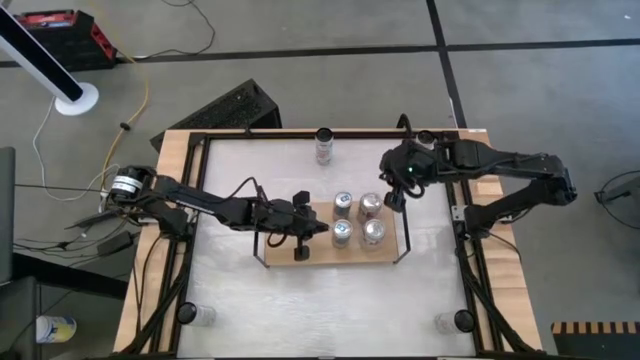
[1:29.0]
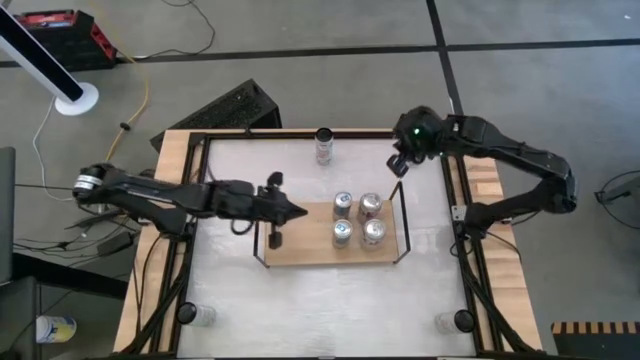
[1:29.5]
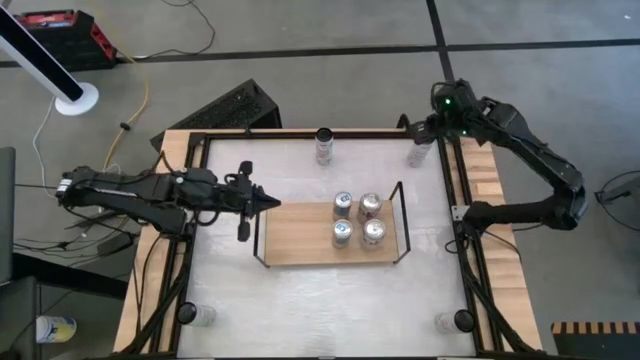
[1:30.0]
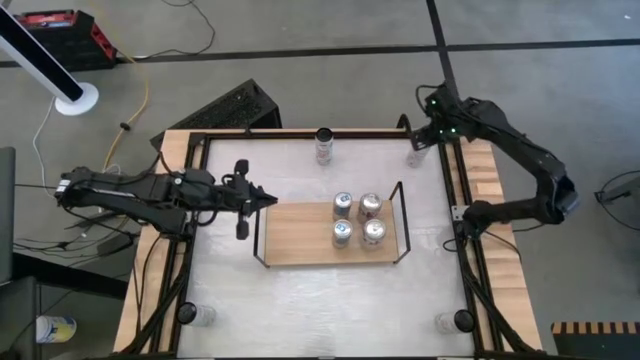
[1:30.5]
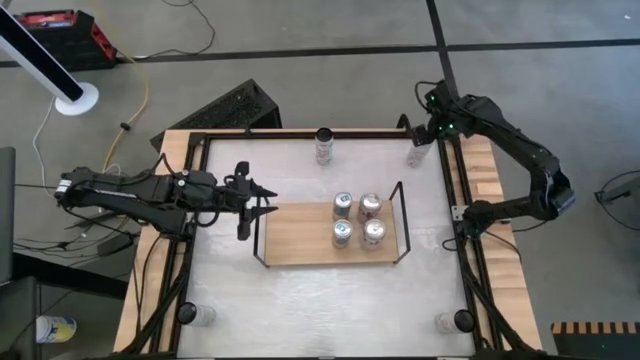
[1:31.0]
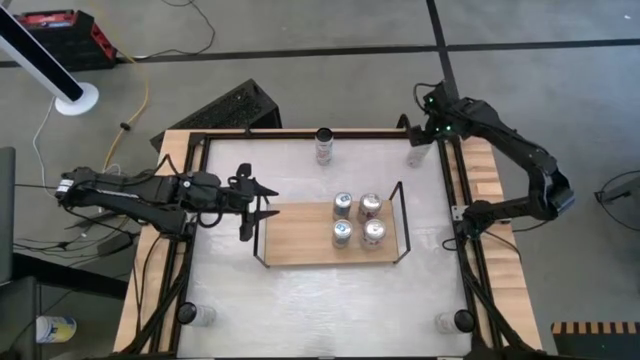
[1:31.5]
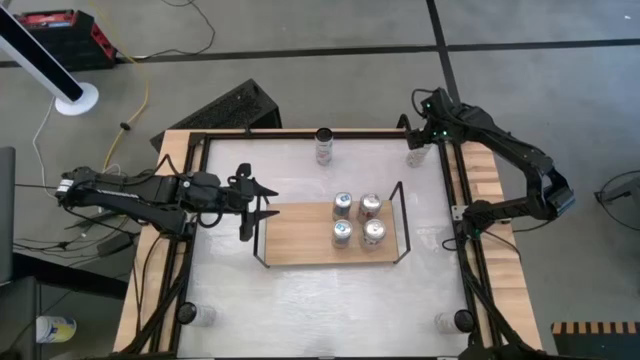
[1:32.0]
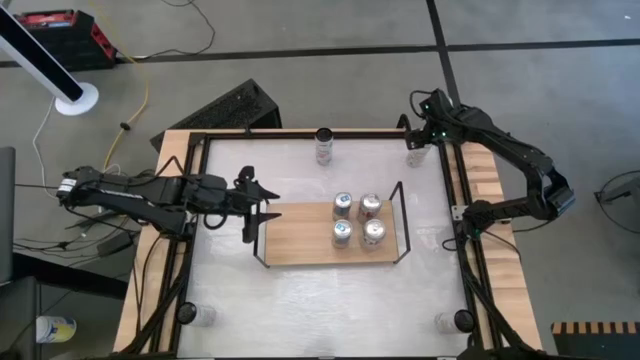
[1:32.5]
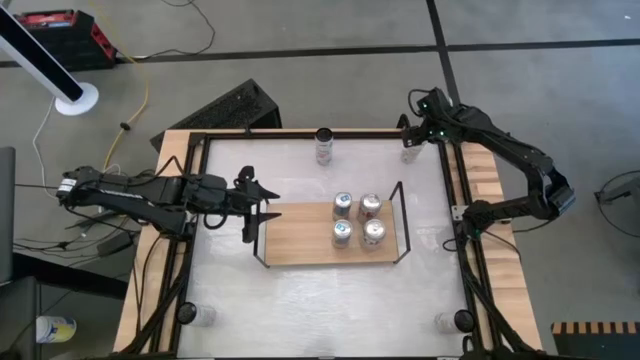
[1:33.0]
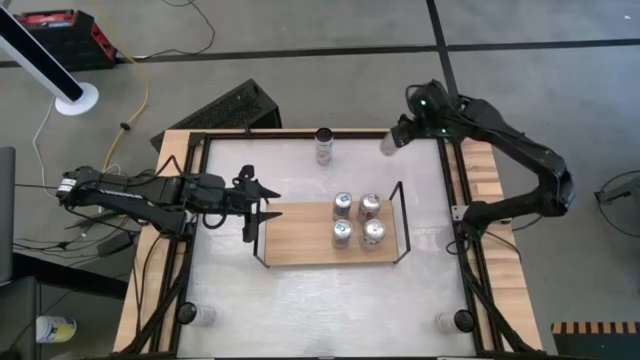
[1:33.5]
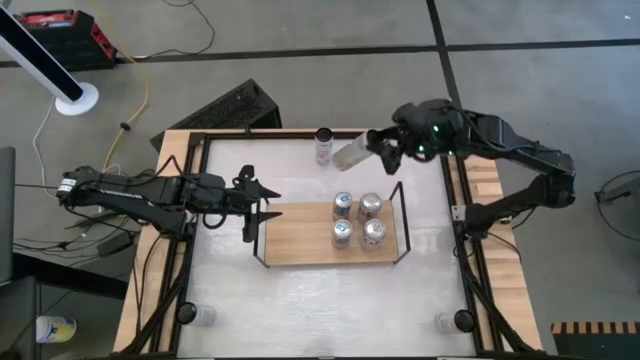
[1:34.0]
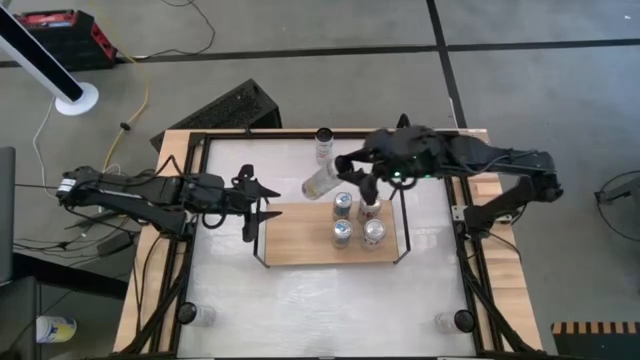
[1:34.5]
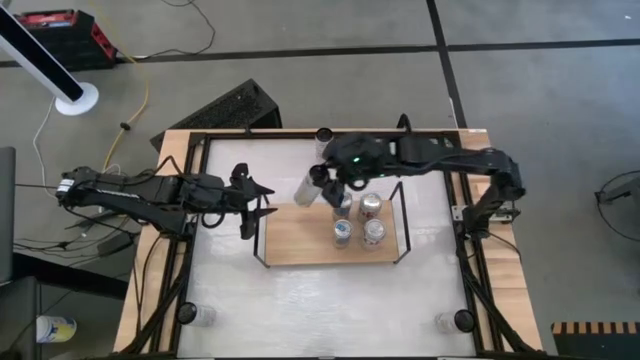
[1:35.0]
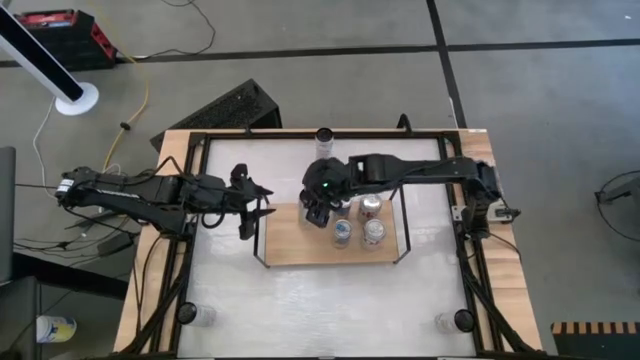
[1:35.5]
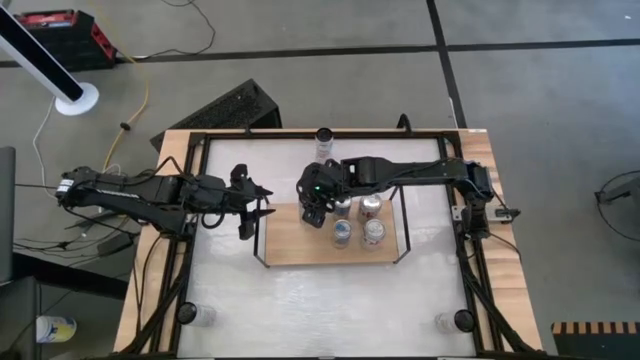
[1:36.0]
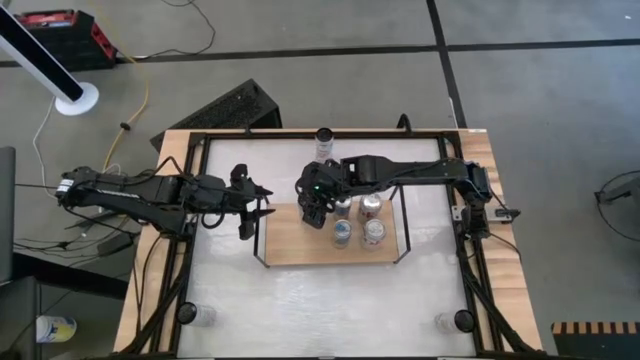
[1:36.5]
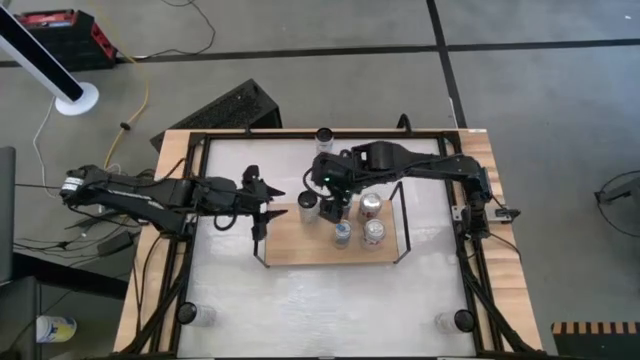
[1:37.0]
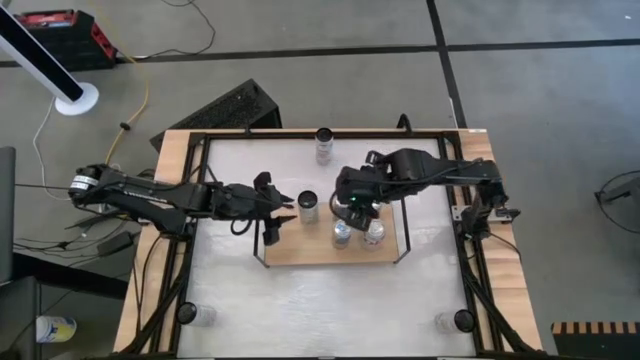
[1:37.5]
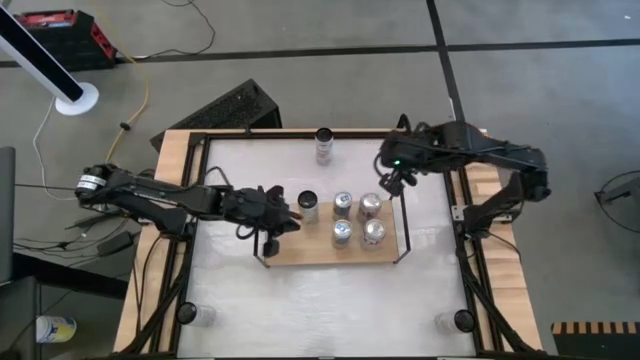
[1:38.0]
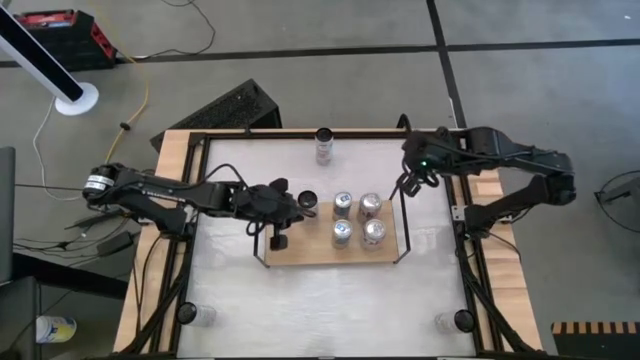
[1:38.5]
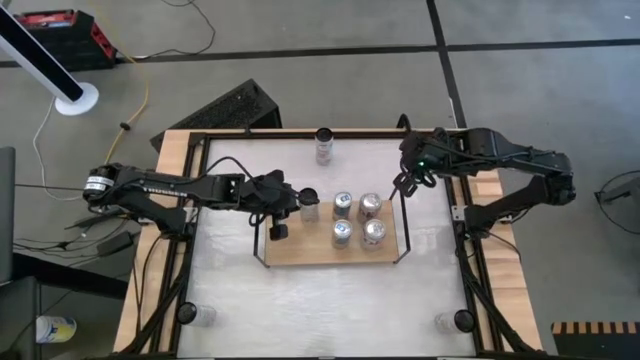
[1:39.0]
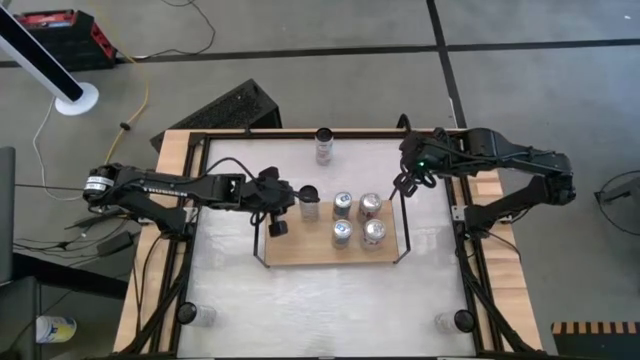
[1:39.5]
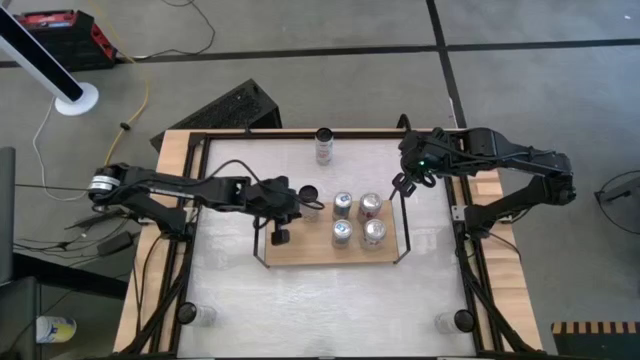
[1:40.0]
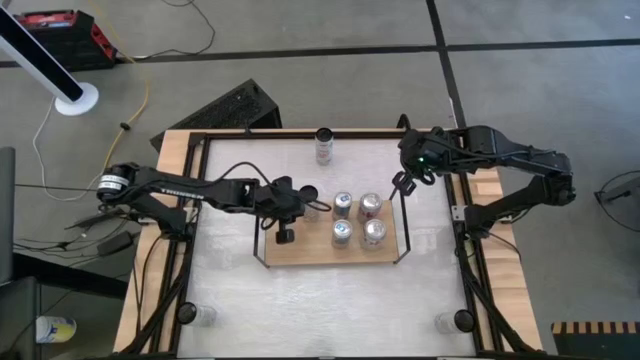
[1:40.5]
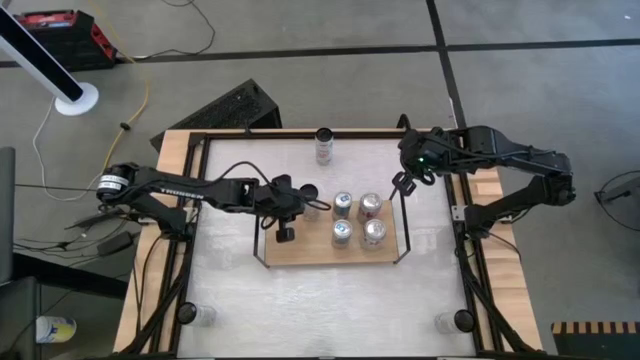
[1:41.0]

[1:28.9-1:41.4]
Task: Place canned beverage on shelf
Put the right white yellow soda can on the shelf

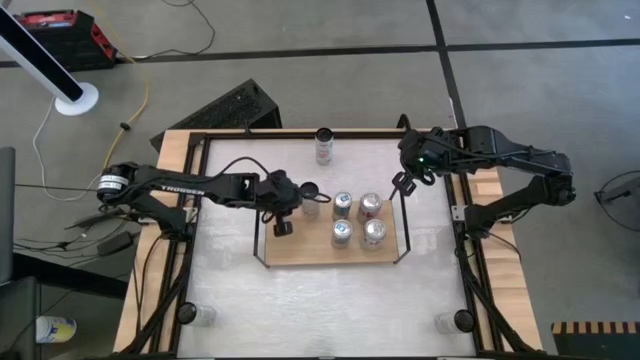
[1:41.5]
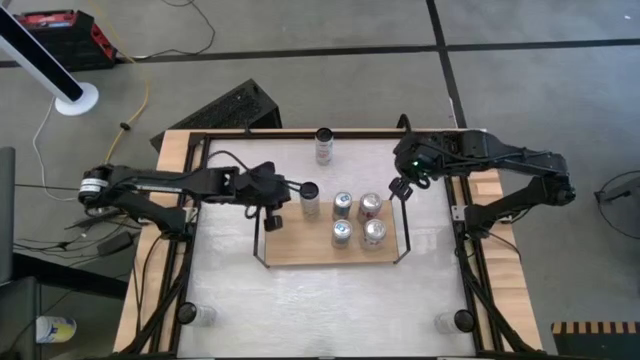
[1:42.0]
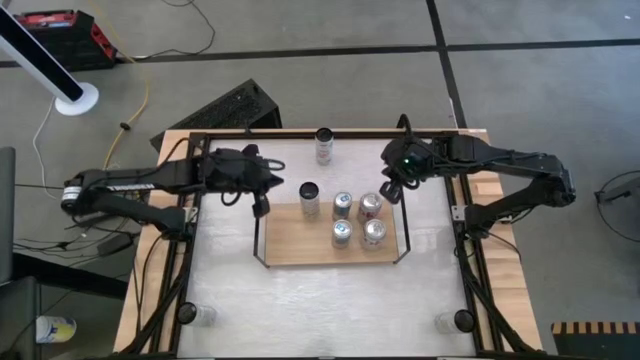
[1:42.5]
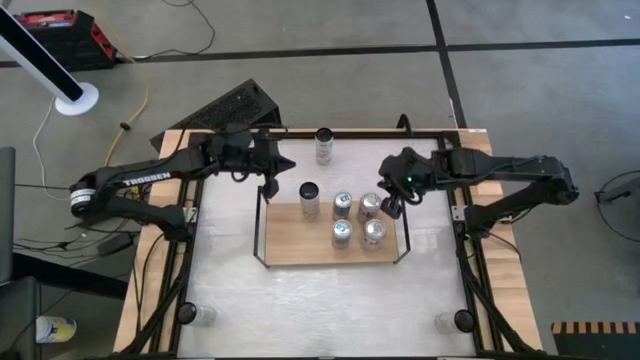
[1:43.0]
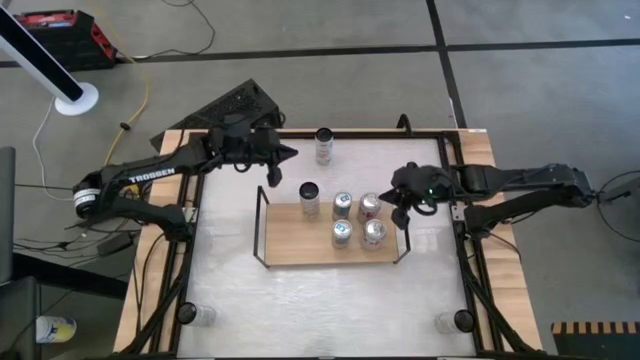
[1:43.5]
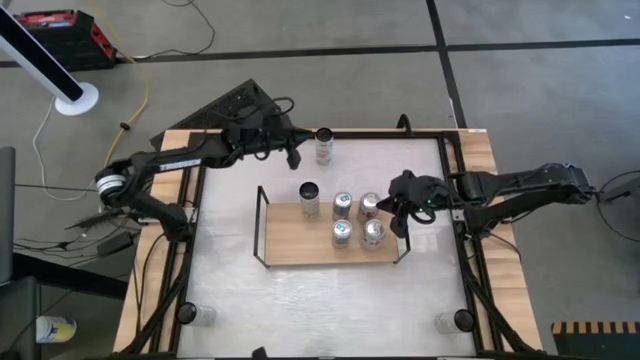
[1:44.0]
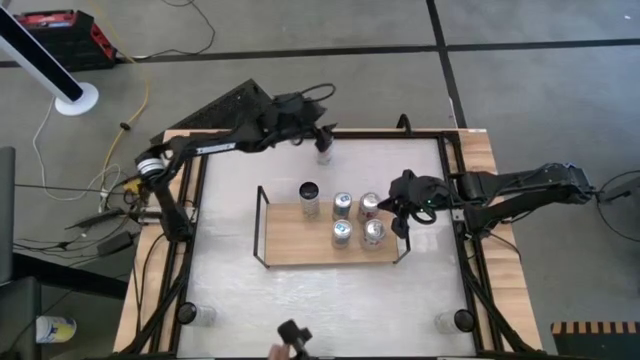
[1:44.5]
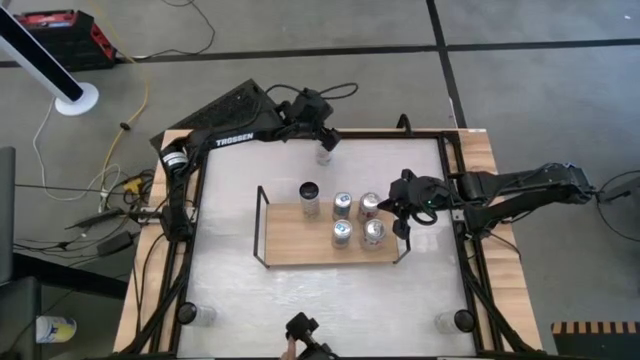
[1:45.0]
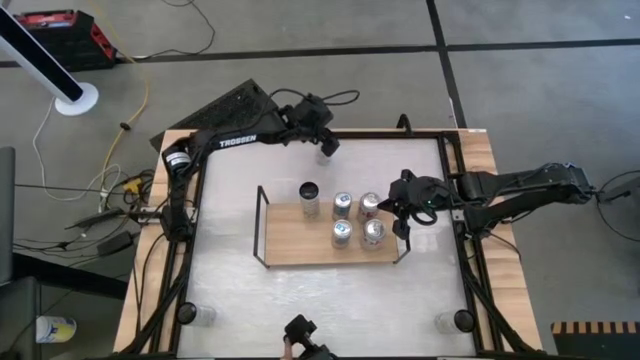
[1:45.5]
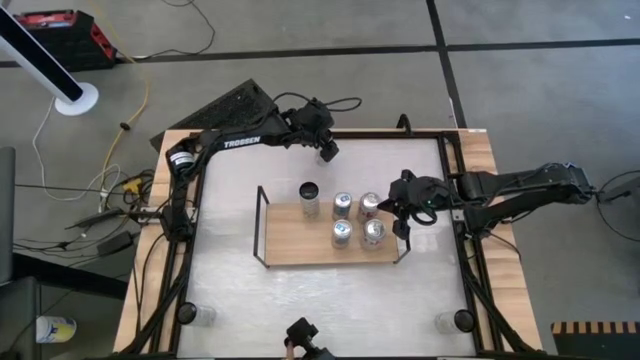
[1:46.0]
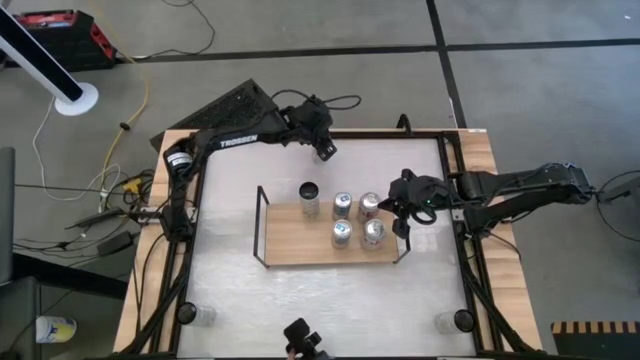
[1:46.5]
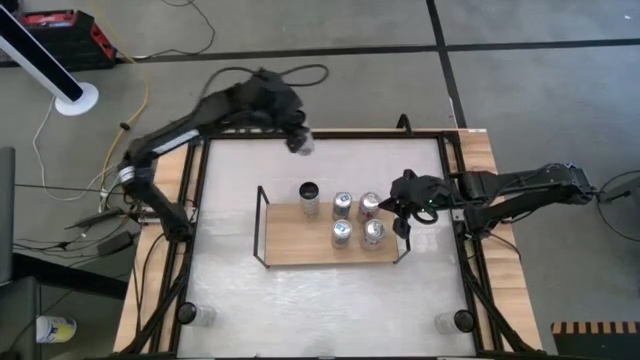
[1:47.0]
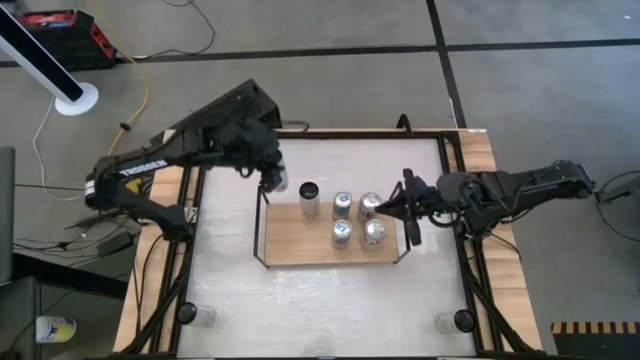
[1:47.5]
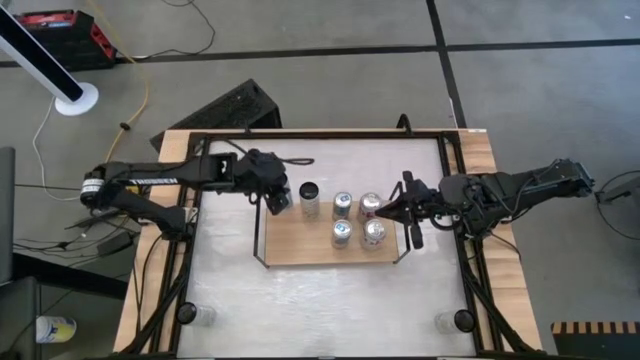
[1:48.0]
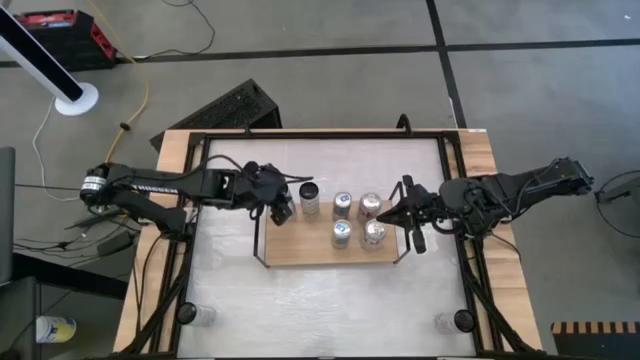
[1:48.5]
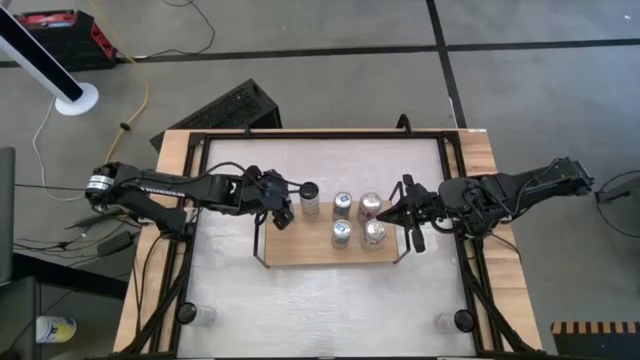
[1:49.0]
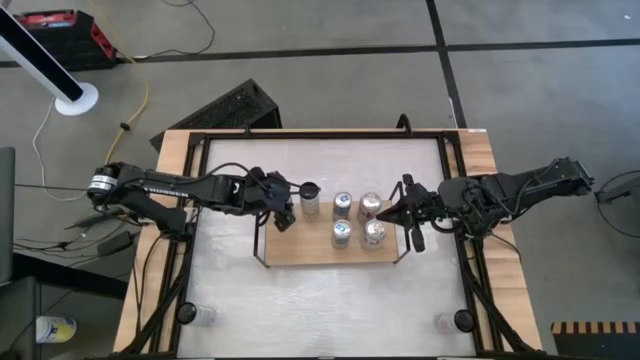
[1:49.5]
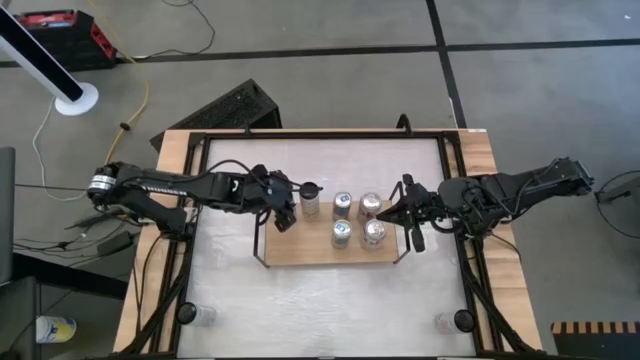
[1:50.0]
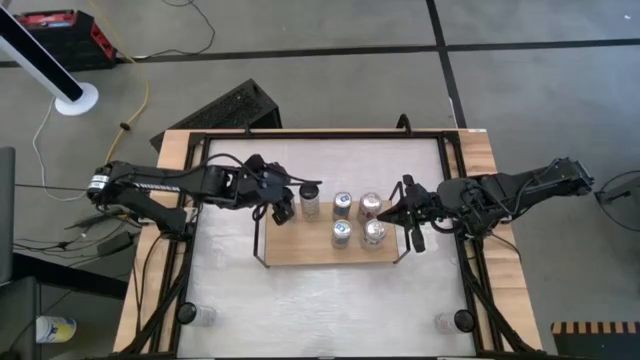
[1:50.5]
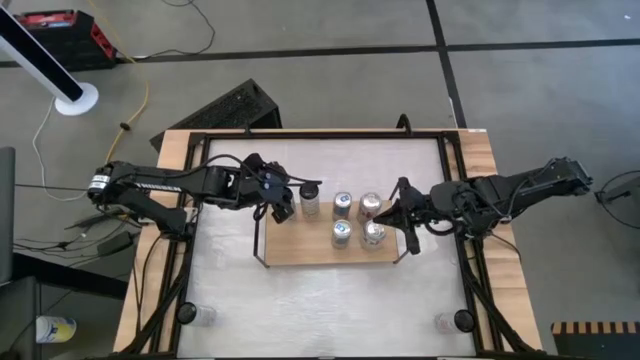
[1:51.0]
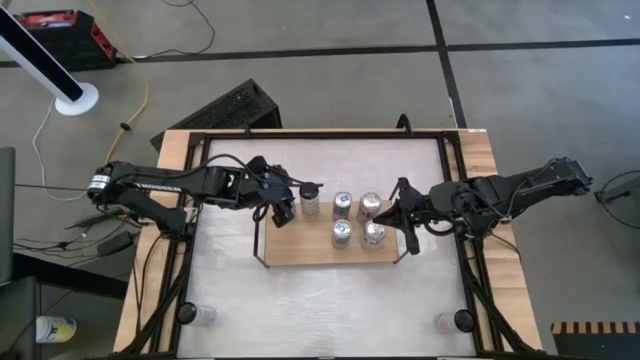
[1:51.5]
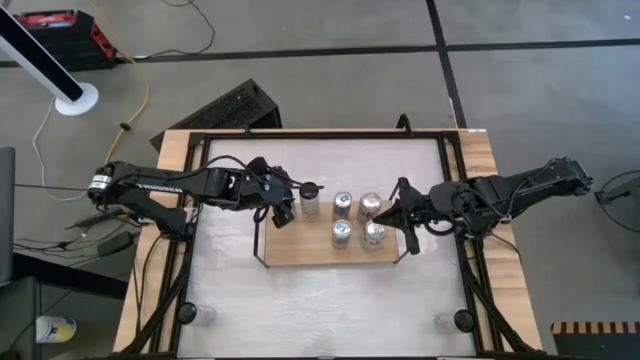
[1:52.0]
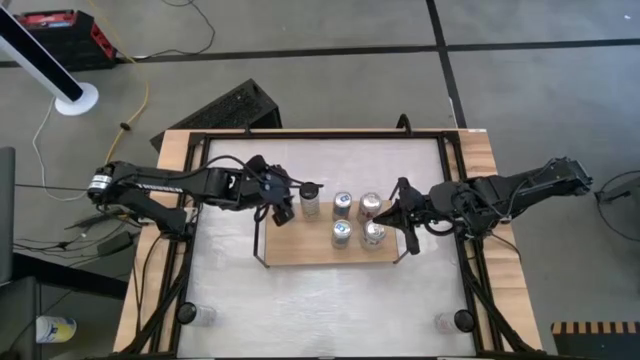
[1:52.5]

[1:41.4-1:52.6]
Put the top white pink soda can on the shelf
